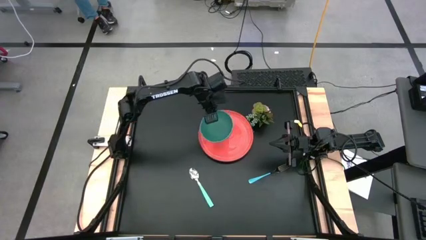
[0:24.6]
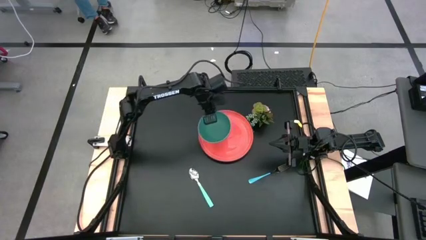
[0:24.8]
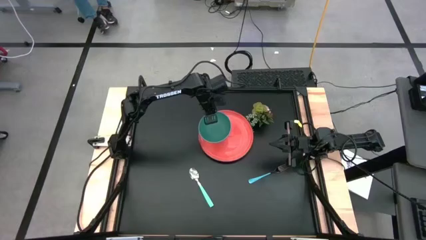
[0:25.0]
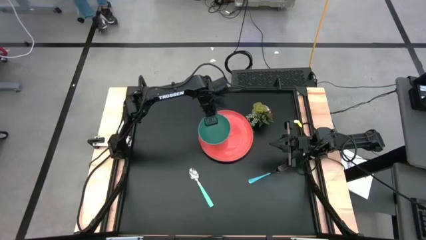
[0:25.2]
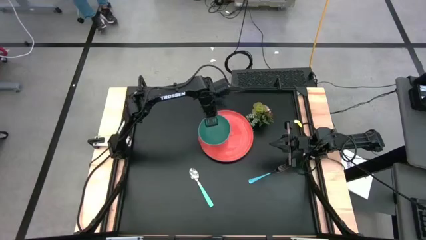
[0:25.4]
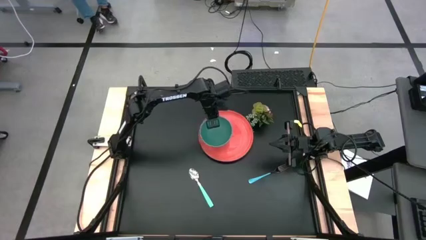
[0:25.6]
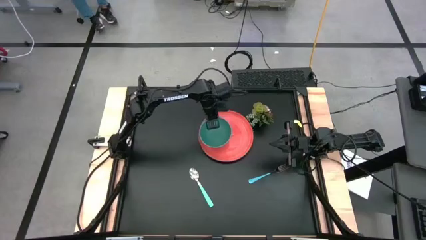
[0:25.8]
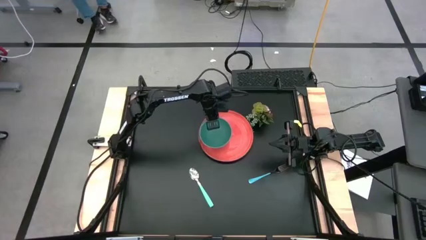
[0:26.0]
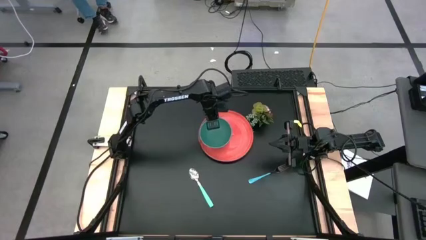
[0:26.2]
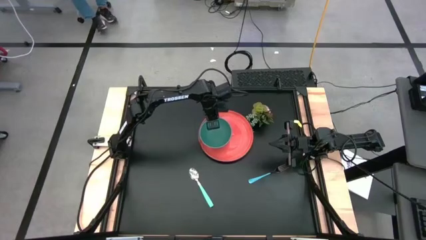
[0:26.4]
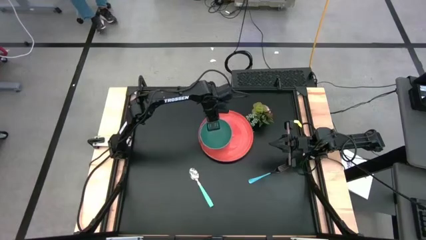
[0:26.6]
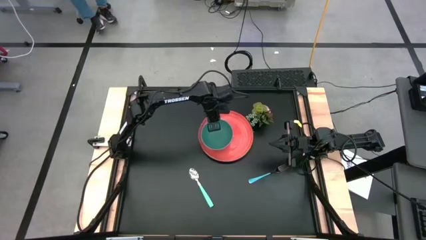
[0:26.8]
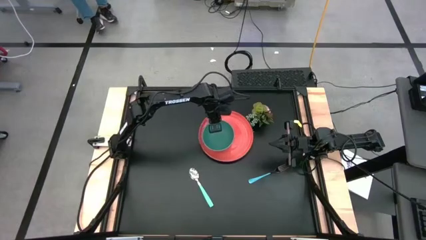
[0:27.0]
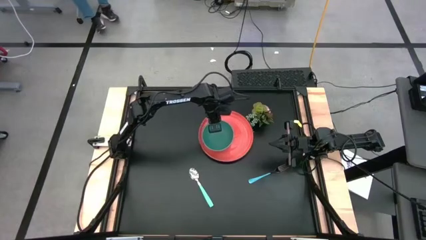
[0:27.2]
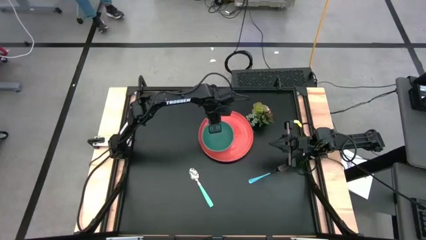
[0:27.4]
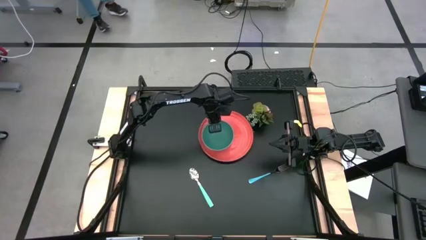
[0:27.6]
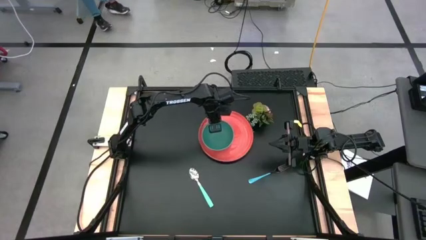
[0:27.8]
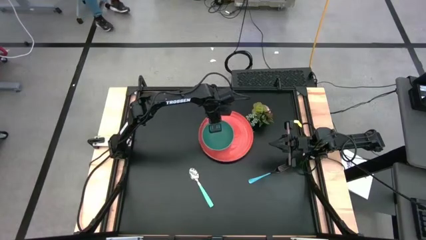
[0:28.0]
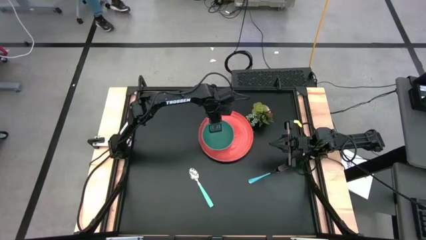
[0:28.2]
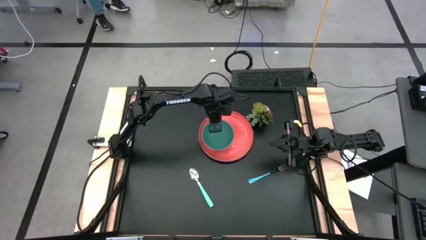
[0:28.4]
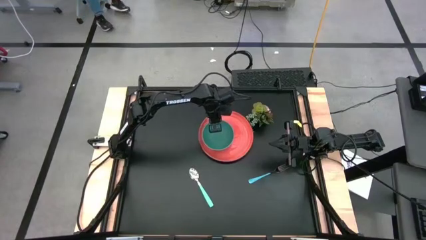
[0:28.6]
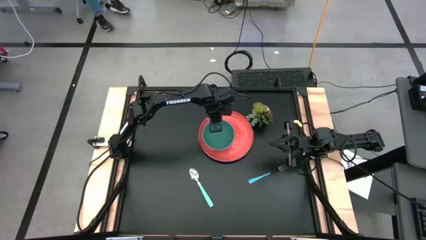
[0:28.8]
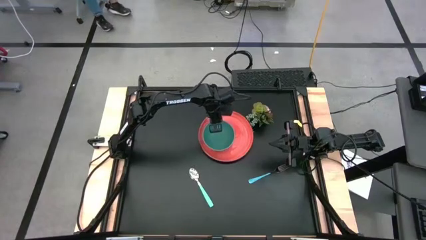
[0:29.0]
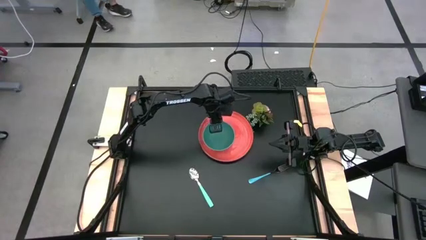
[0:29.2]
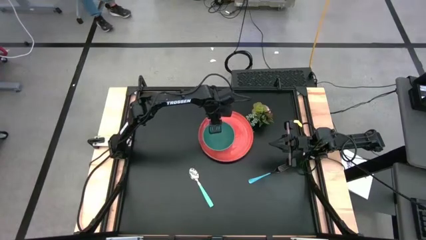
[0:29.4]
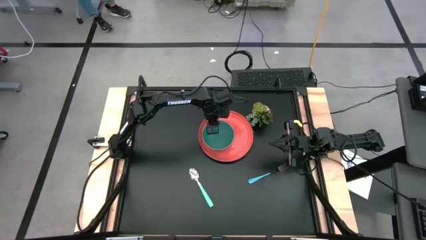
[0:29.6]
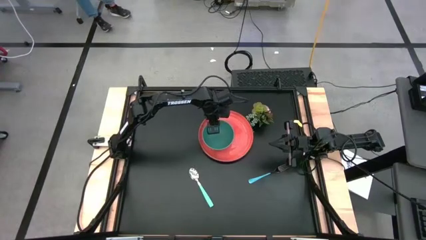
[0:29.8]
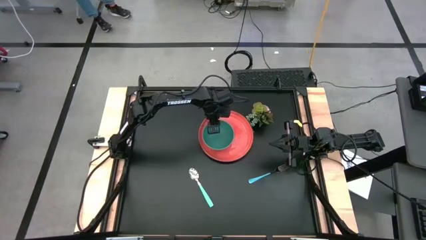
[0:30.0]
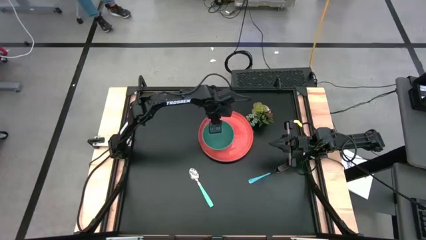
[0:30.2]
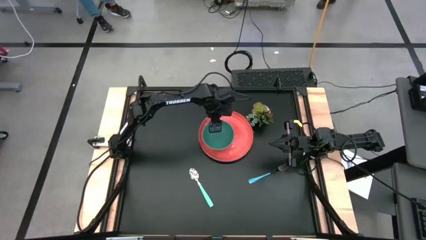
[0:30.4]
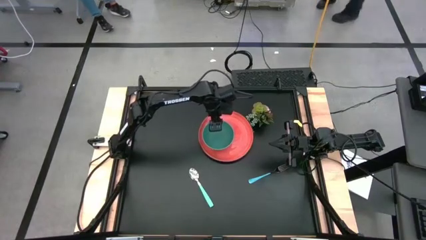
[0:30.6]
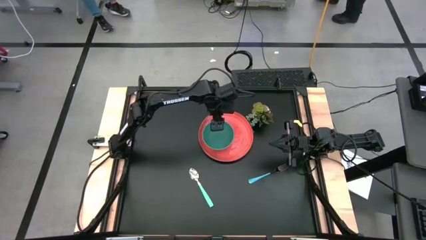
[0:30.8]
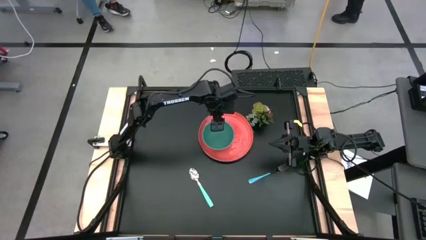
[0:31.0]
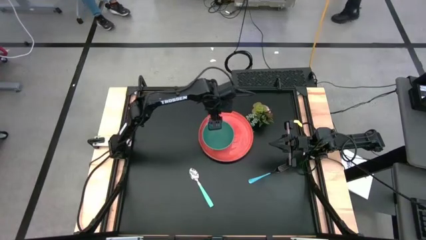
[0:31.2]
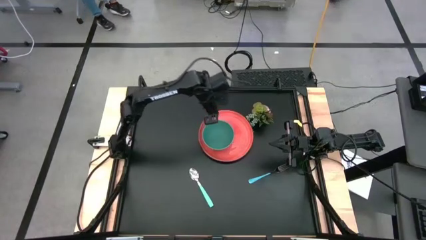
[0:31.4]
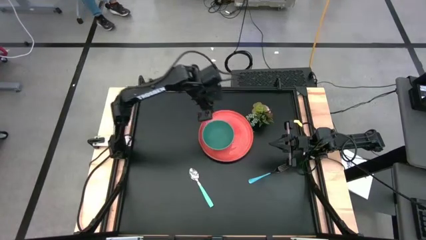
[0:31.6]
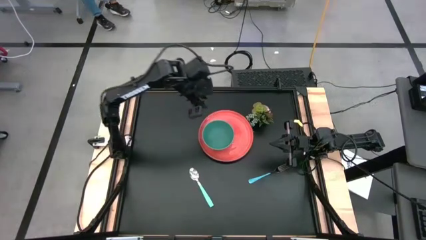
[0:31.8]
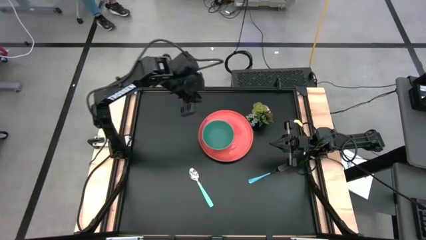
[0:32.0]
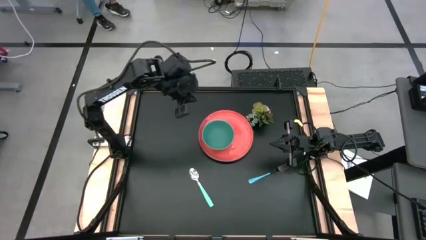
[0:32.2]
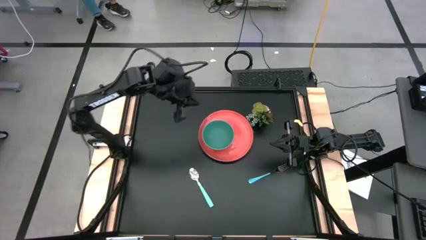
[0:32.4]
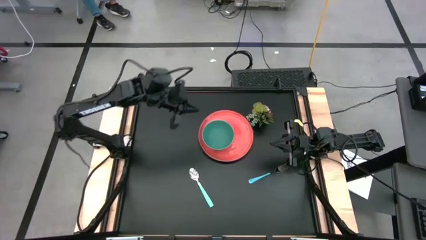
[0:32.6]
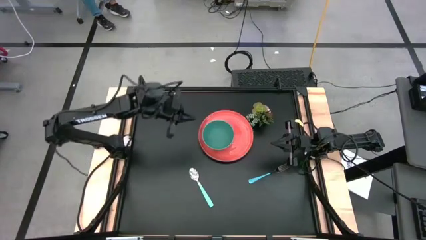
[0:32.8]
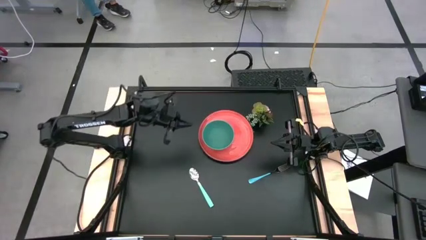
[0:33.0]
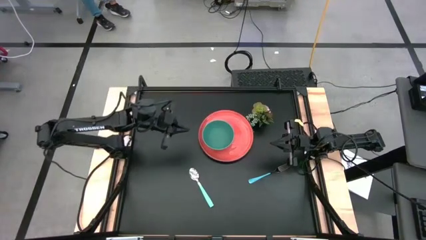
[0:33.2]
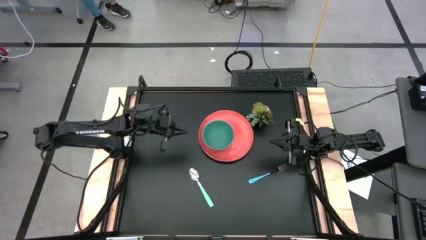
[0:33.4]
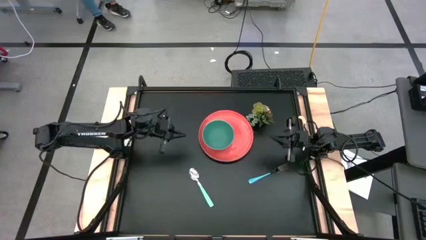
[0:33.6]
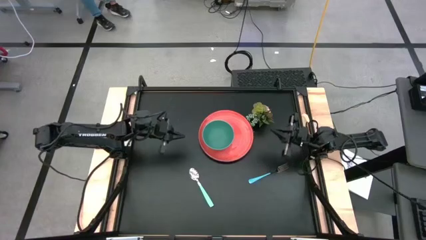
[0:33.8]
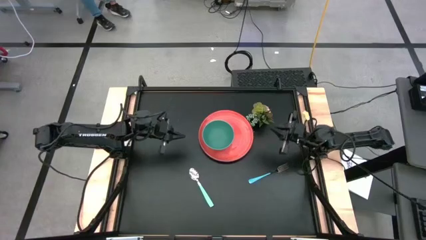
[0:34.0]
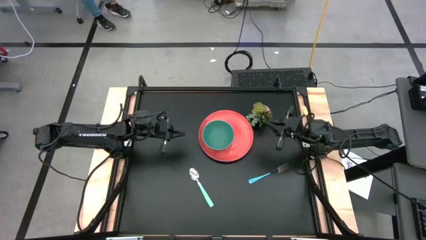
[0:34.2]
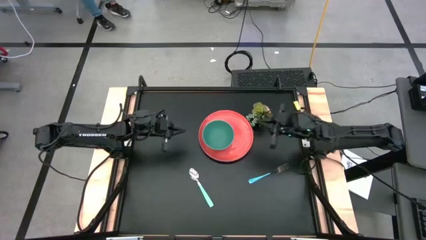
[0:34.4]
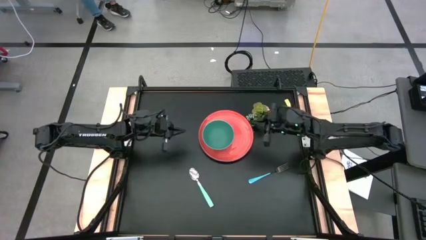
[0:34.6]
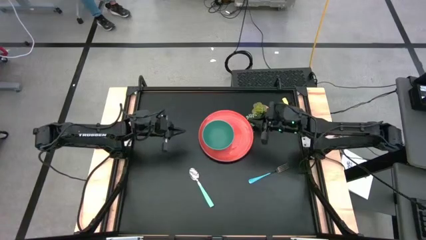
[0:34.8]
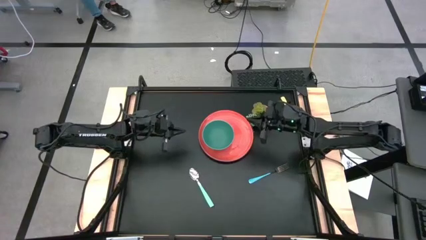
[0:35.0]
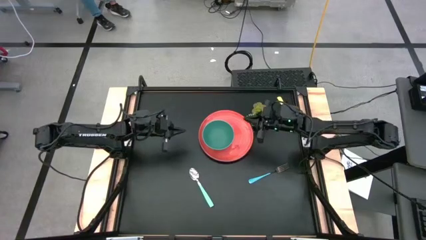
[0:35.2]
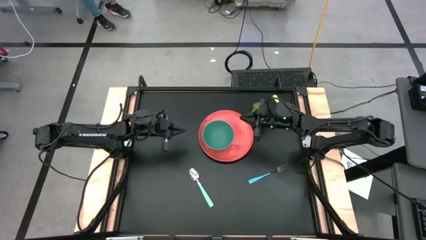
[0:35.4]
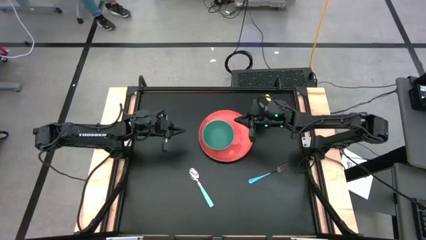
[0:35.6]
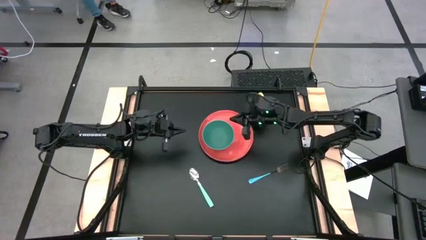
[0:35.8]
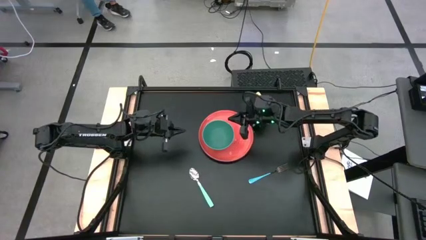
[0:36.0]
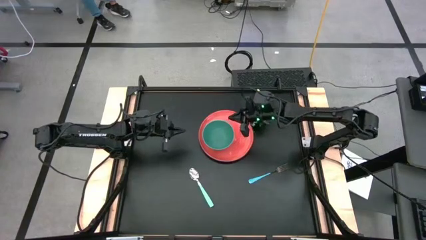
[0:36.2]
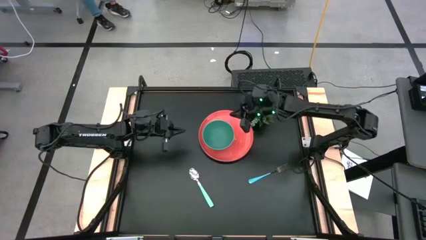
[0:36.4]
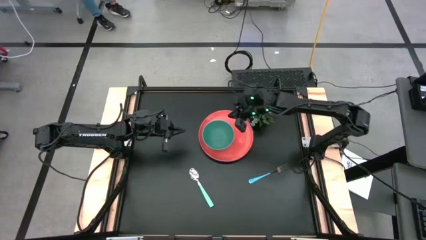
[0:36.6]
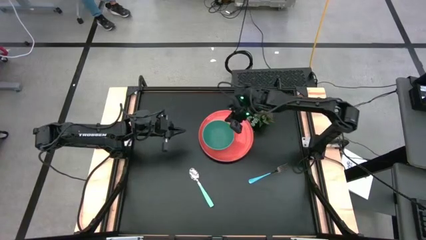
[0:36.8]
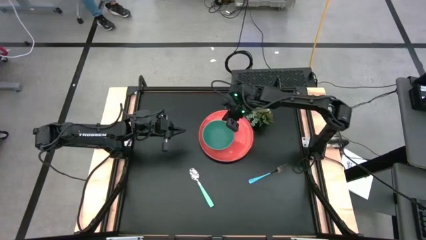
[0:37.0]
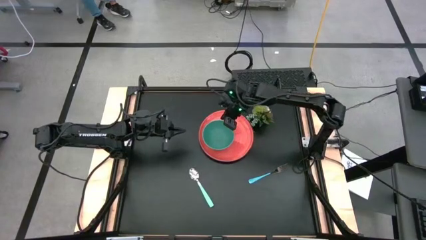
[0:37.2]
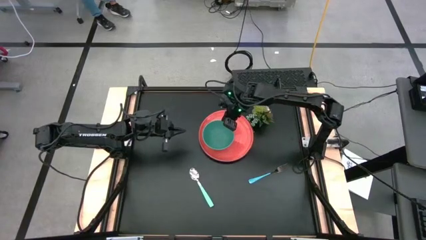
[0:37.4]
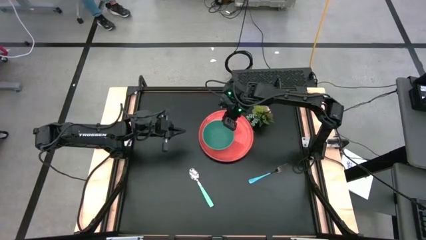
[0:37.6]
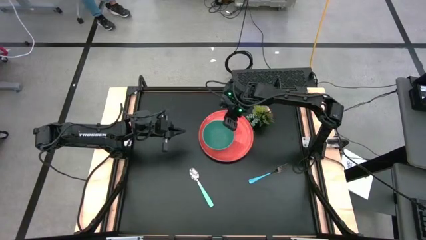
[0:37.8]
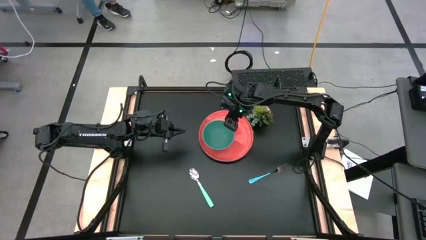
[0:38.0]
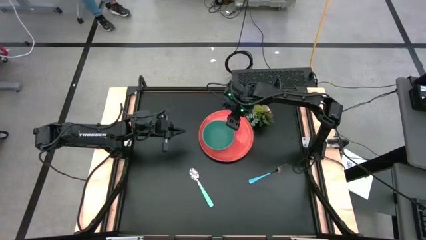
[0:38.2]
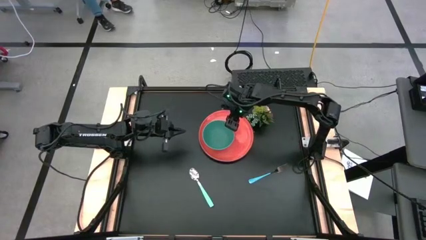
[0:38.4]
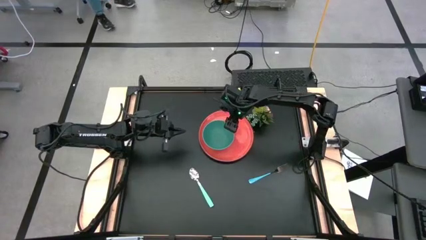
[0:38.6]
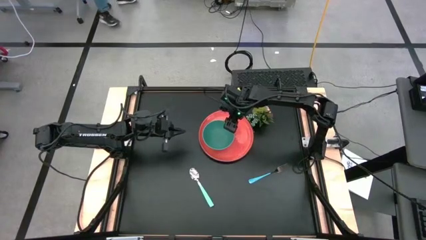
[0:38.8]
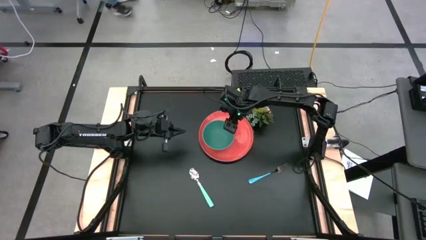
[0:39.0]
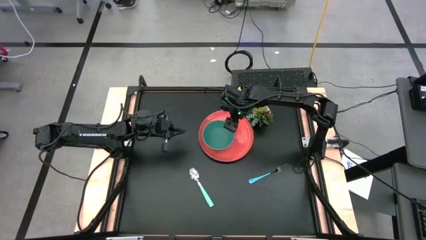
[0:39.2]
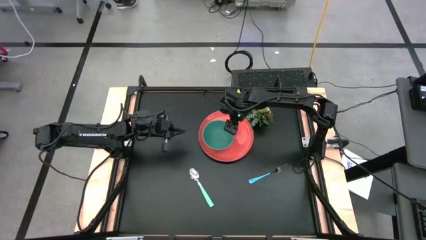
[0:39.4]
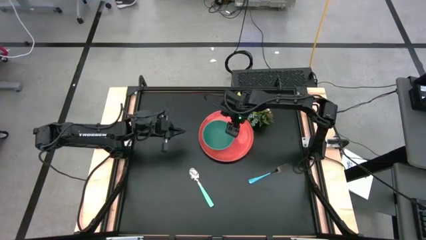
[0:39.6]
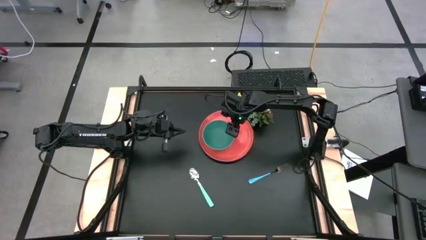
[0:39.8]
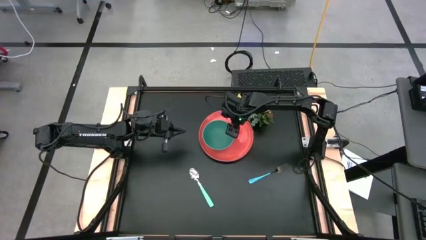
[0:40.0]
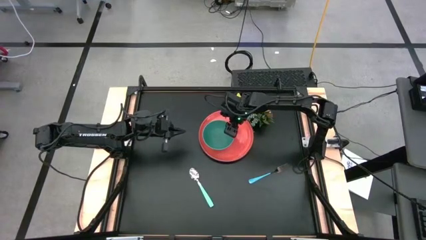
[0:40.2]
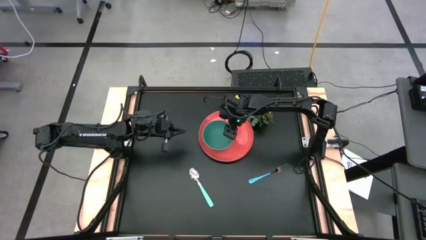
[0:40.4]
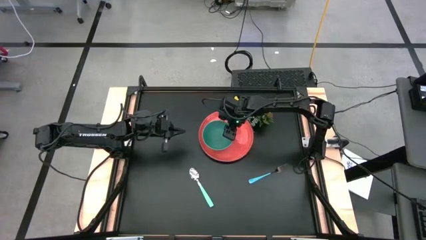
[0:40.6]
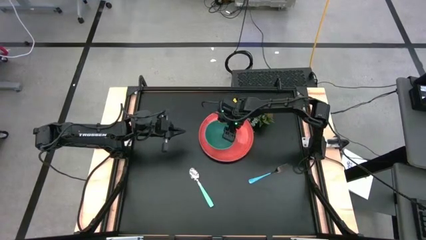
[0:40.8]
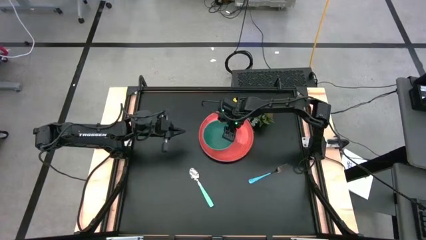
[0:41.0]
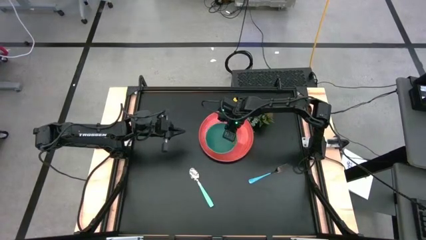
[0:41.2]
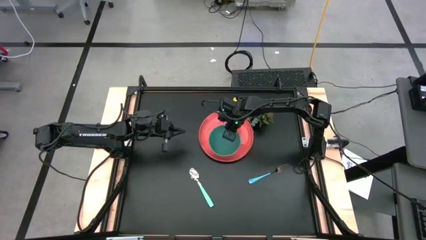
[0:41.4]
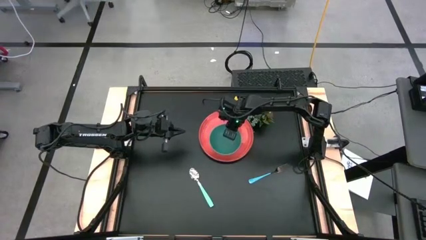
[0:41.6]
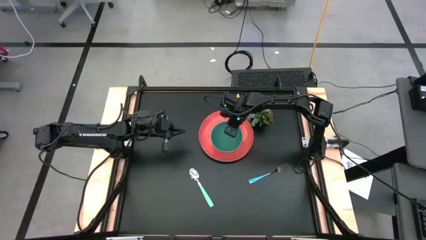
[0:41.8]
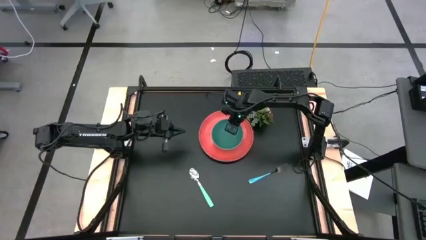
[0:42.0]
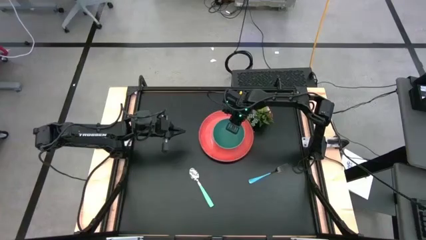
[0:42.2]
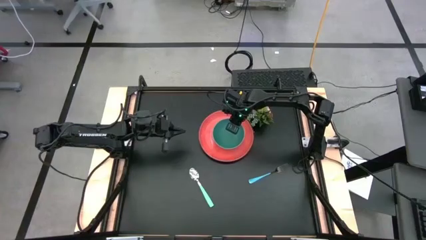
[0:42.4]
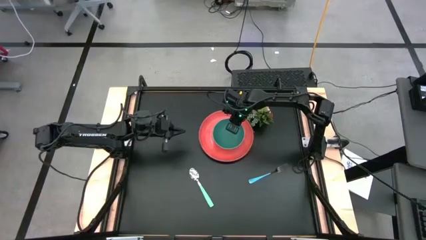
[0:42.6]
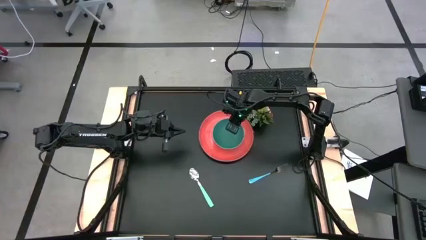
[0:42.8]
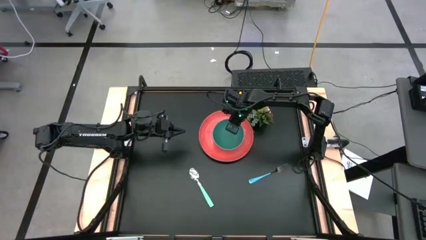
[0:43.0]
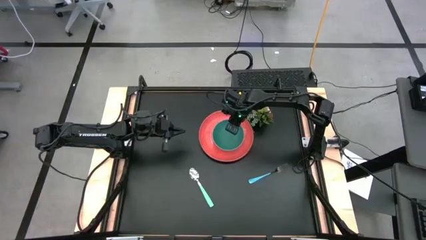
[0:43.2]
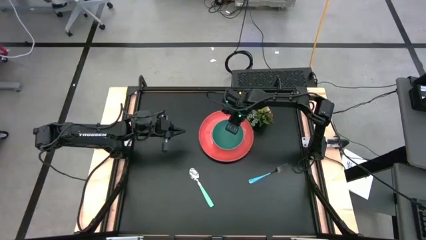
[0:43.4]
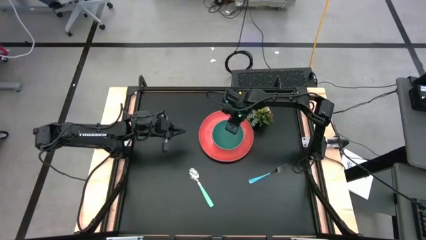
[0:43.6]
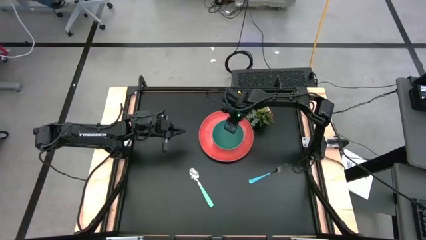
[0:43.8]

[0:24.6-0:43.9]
Task: Set table place
Stack the green bowl on the orange plate
